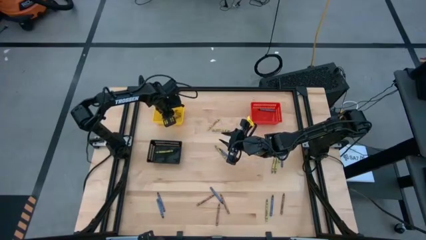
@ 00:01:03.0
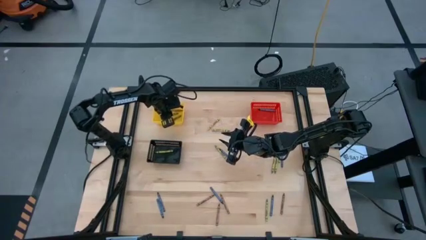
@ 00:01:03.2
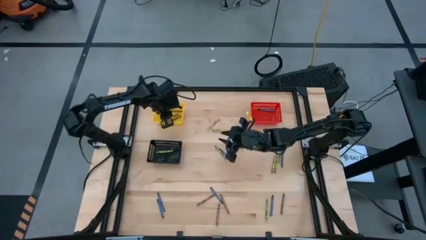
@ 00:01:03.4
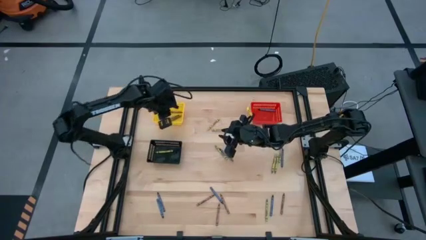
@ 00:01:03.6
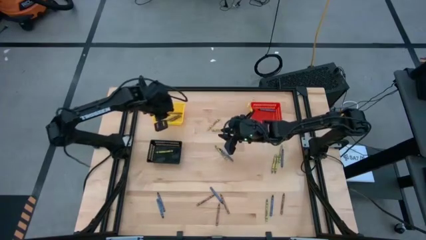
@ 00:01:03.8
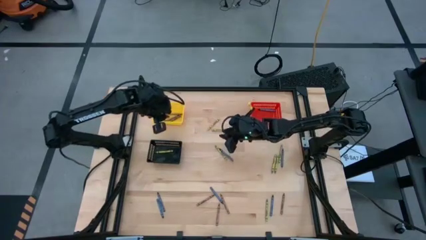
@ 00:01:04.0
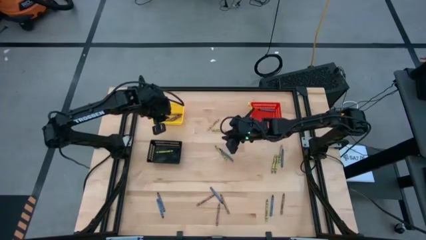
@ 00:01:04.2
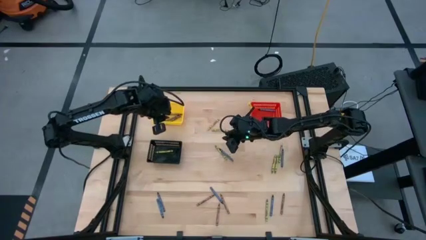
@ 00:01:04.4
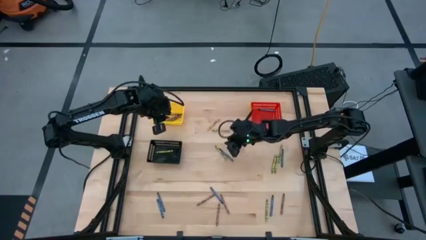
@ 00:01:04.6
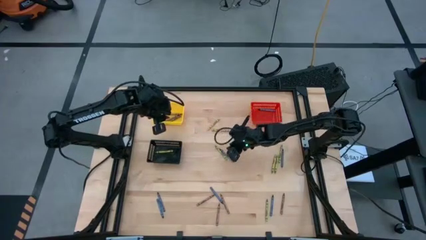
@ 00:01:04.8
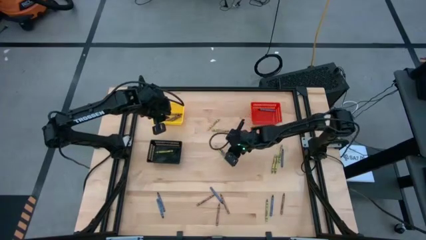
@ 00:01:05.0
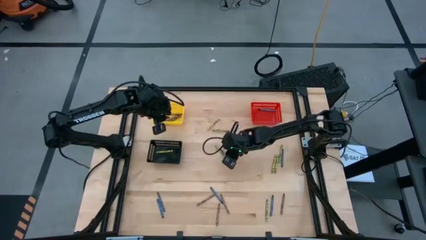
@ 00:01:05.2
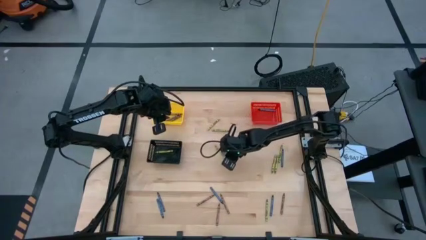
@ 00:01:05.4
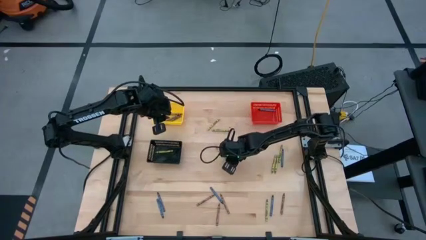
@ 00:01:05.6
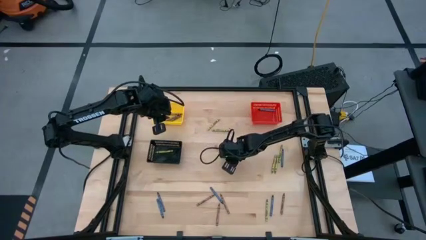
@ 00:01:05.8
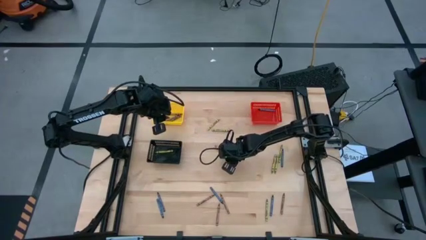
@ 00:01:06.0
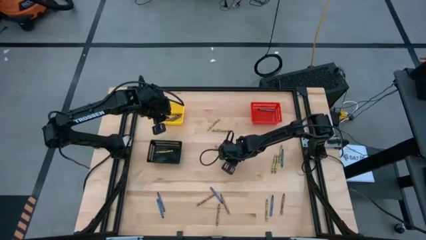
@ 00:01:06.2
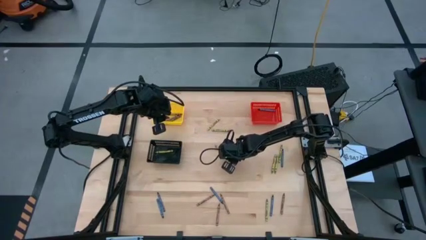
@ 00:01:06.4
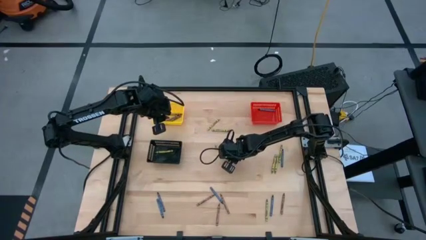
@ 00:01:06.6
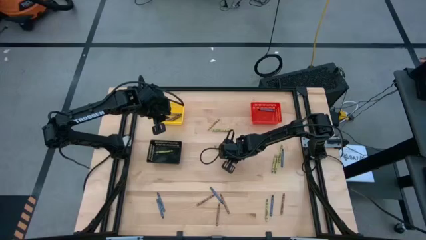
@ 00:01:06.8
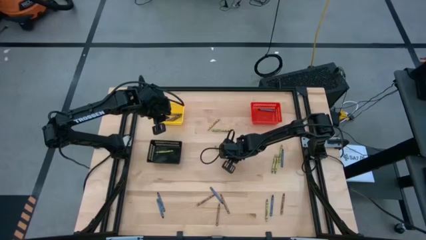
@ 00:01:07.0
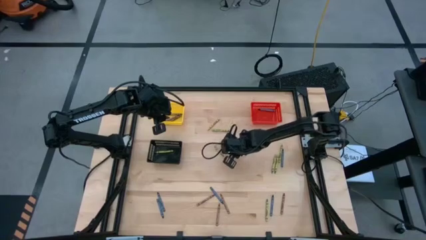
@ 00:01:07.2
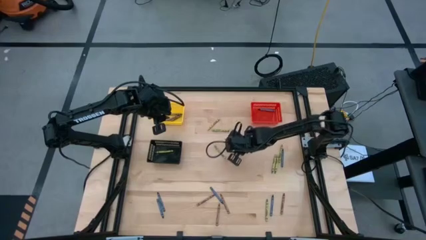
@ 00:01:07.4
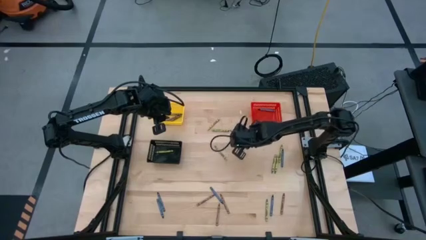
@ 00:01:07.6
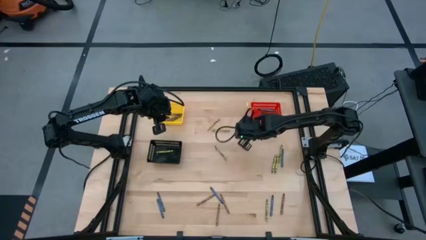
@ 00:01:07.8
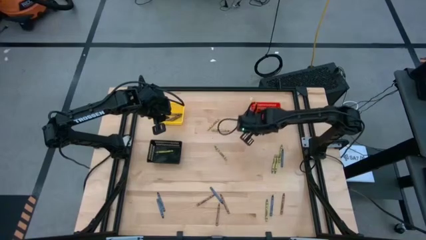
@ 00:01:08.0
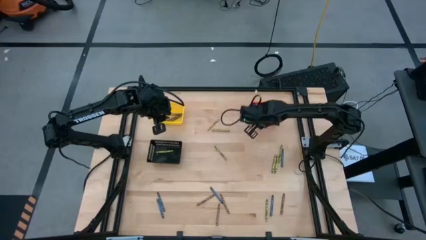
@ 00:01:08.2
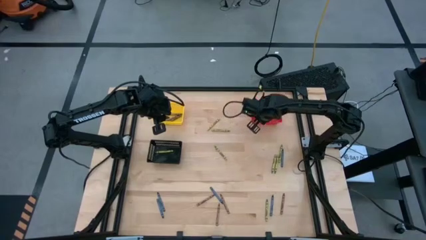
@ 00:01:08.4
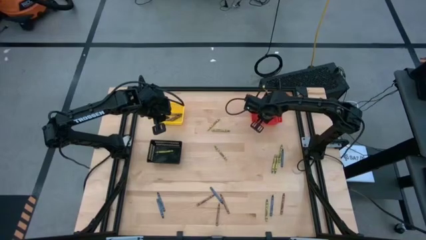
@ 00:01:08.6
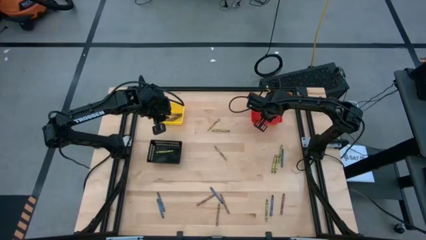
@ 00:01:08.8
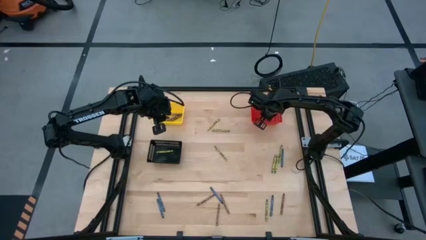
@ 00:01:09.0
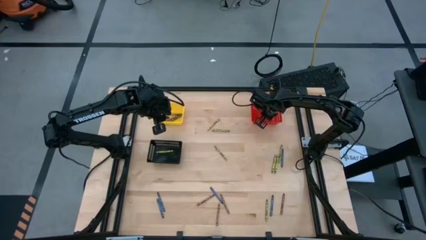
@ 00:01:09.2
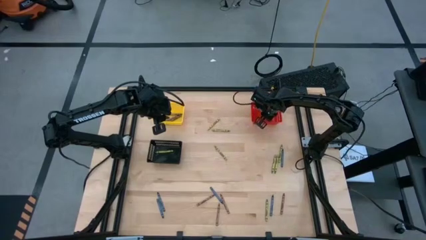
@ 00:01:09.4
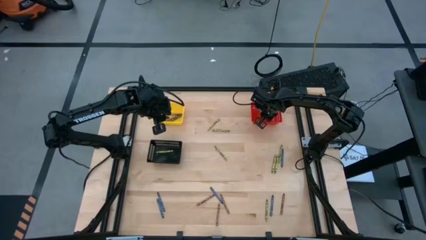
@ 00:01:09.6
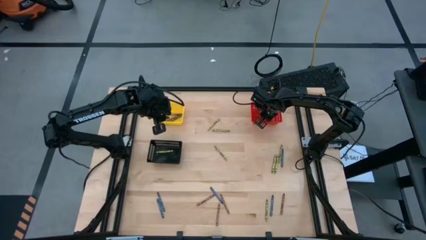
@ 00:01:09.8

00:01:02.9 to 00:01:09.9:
Task: Sort crayons
Put the blue crayon into the red bin

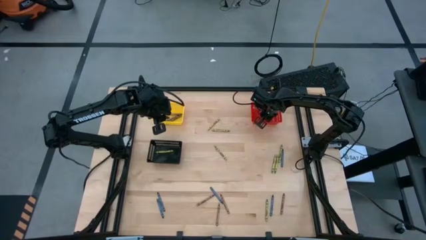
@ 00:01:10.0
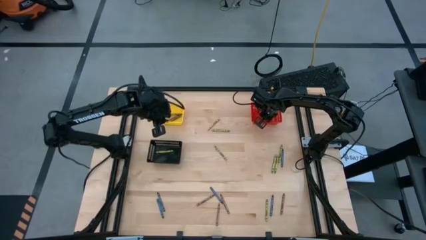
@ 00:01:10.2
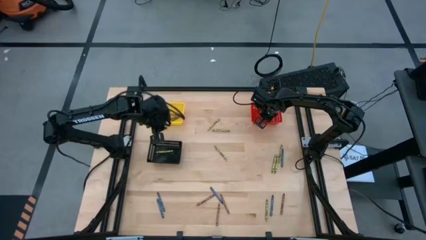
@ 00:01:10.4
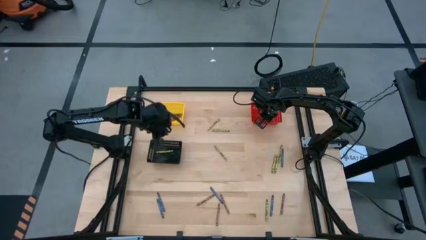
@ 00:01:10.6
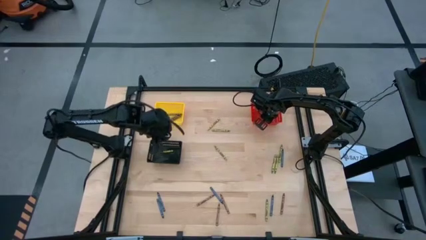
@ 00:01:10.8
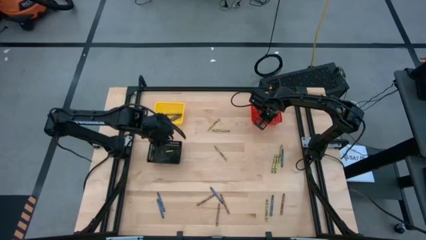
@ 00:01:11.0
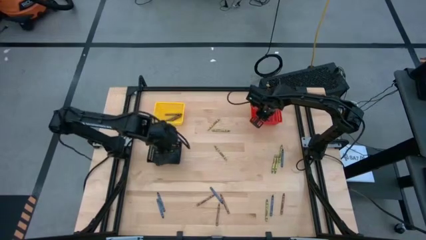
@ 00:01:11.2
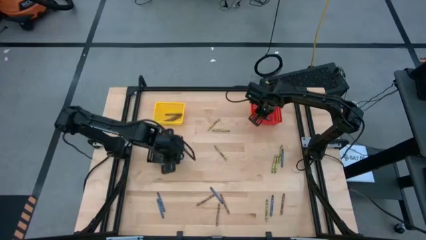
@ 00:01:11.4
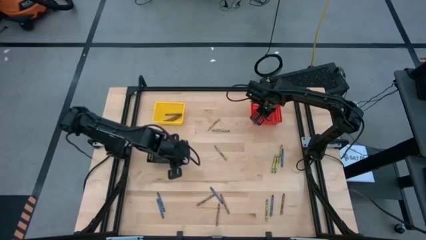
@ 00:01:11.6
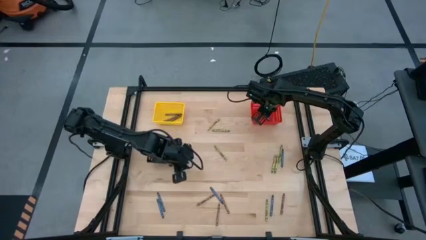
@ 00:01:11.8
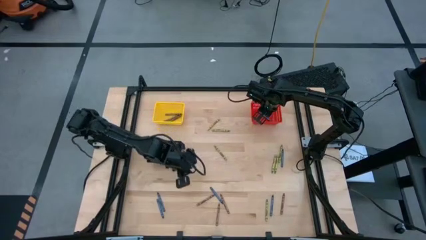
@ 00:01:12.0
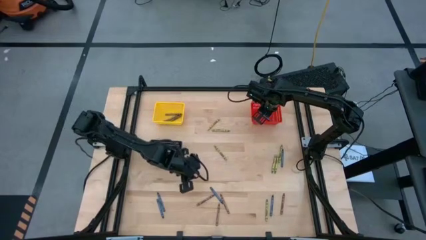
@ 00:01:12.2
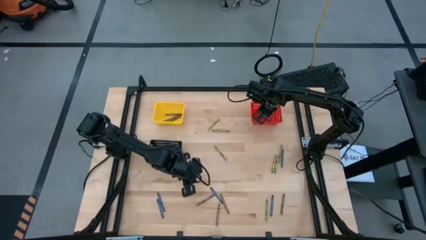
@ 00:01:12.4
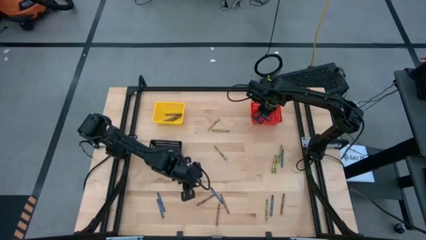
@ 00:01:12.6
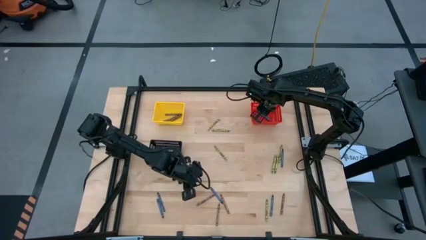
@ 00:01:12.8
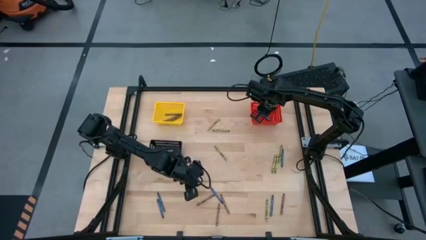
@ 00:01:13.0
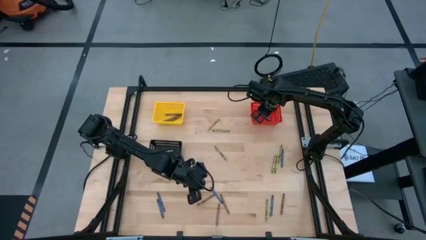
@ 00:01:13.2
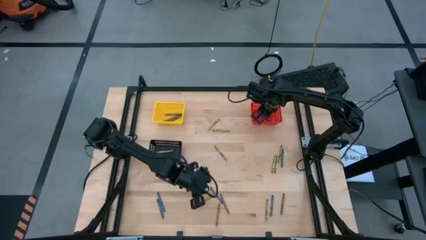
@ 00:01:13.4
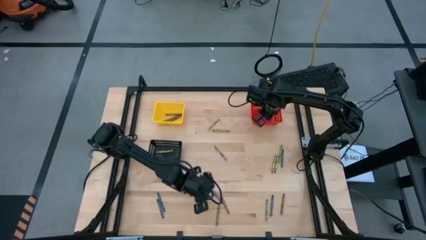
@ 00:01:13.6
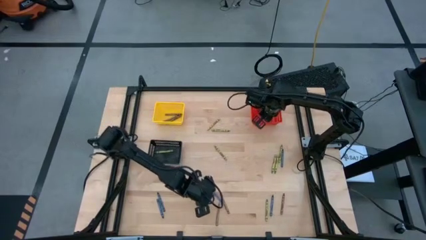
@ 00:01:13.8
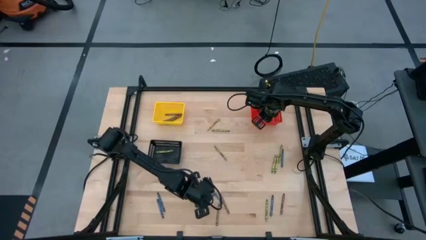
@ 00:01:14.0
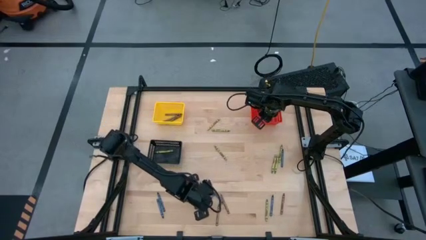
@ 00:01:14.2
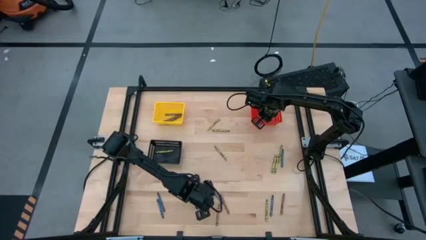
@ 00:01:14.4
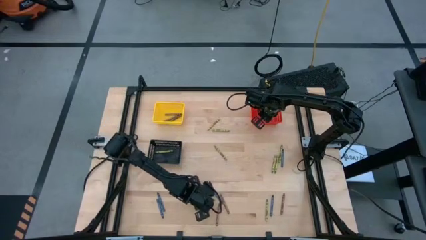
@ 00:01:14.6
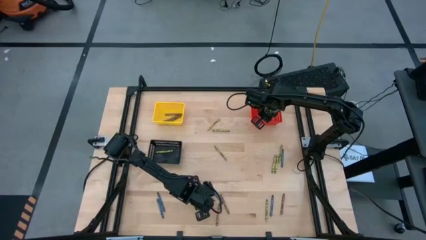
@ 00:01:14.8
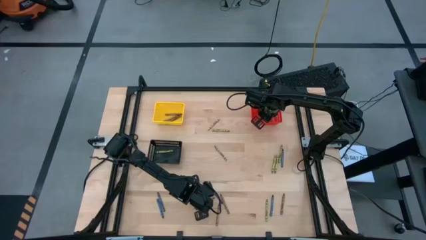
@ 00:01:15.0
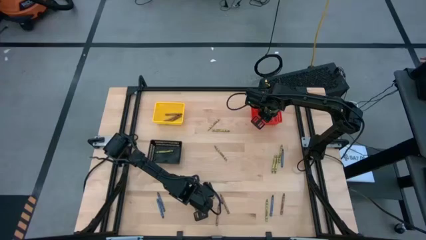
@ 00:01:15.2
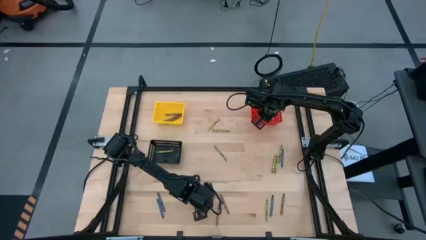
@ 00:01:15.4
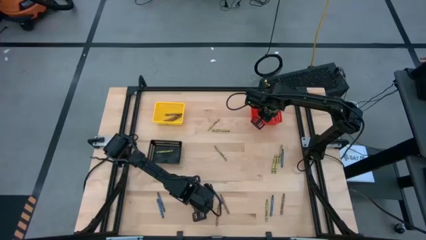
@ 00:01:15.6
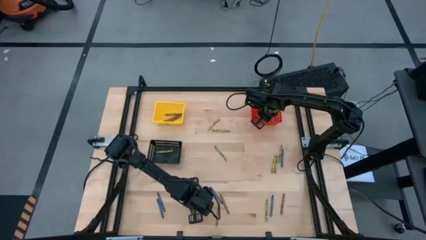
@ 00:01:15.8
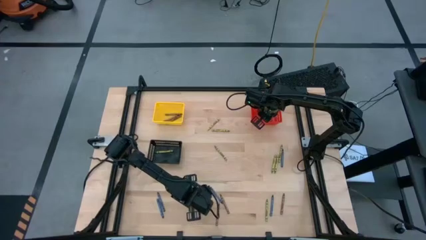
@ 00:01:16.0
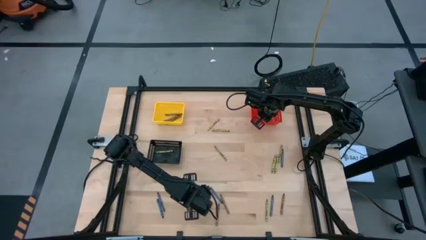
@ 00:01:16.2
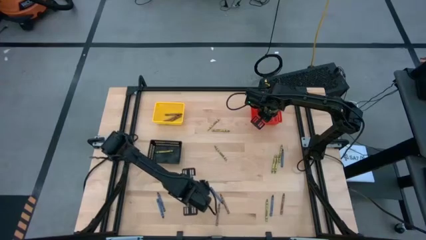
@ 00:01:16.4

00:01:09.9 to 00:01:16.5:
Put the brown crayon into the yellow bin
